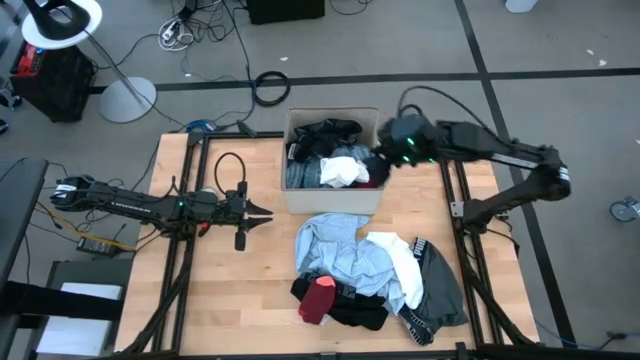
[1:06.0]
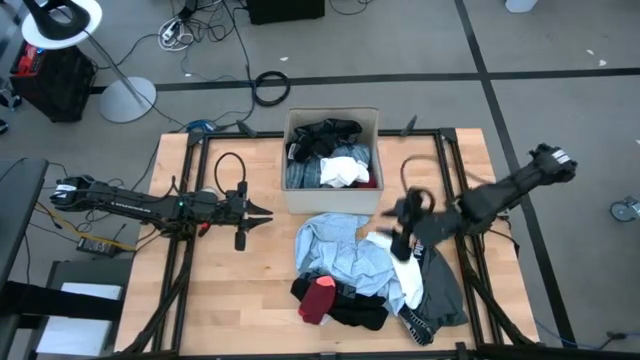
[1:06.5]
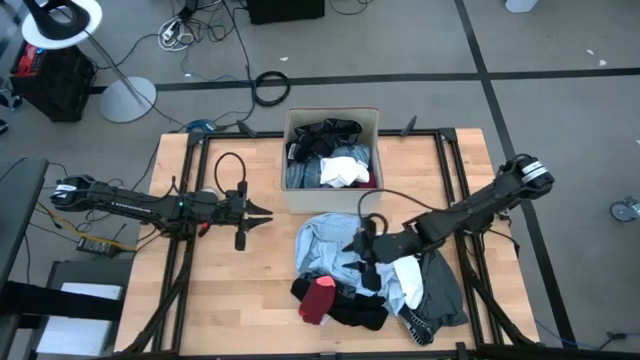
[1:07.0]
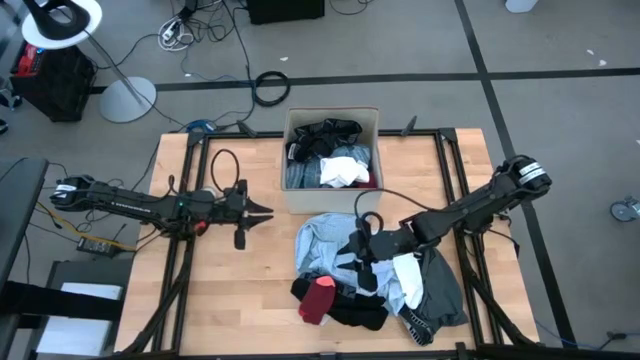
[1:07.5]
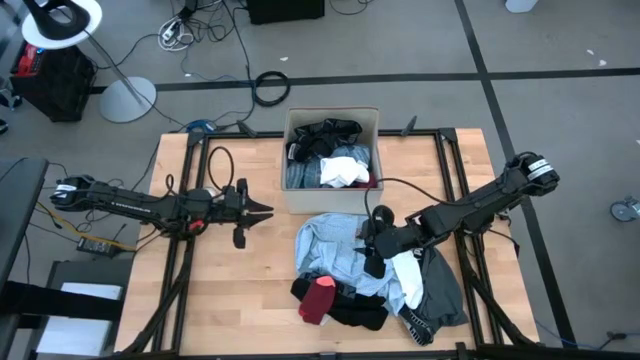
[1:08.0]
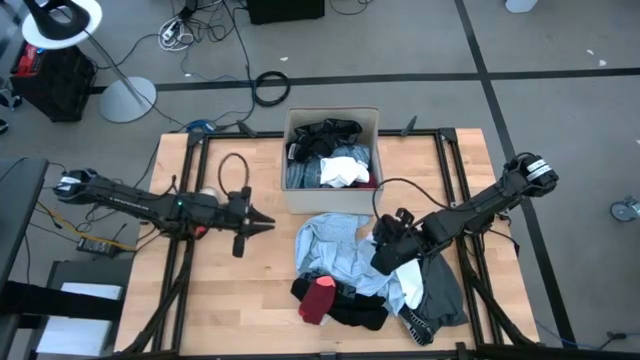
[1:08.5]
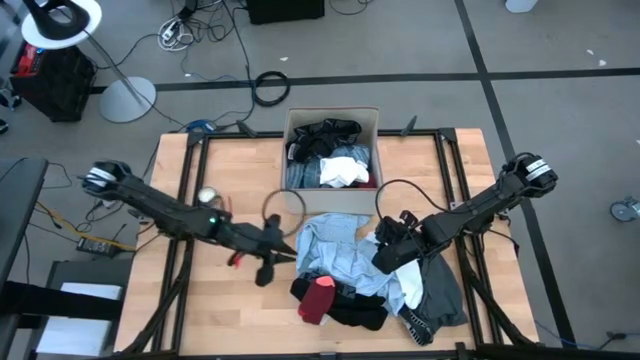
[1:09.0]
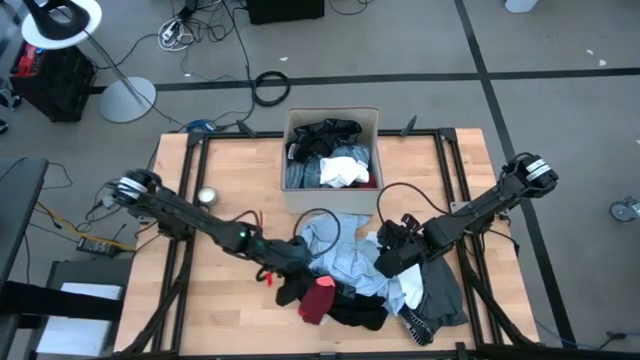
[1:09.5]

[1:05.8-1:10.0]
Task: Sort clothes
Put the red sock into the white laundry bin

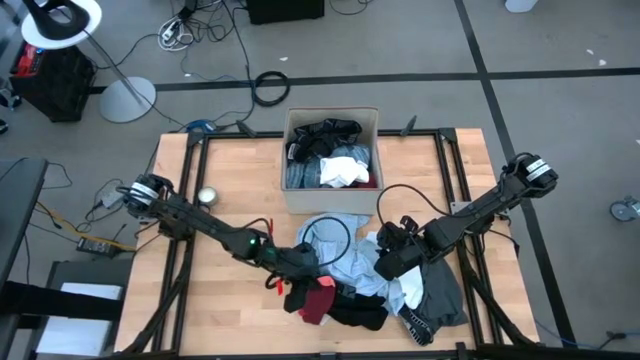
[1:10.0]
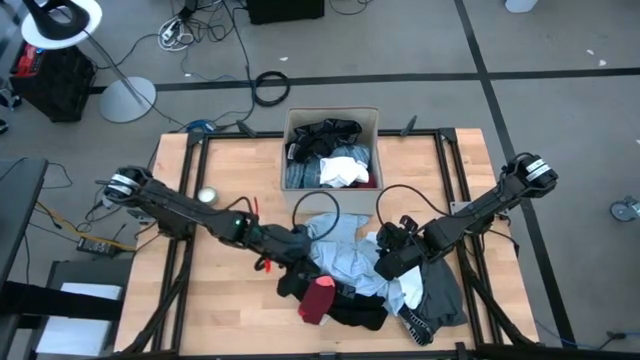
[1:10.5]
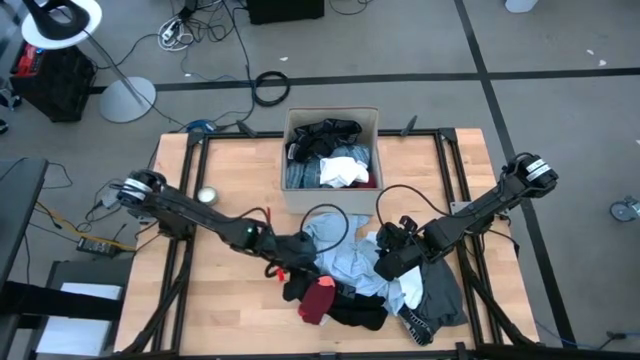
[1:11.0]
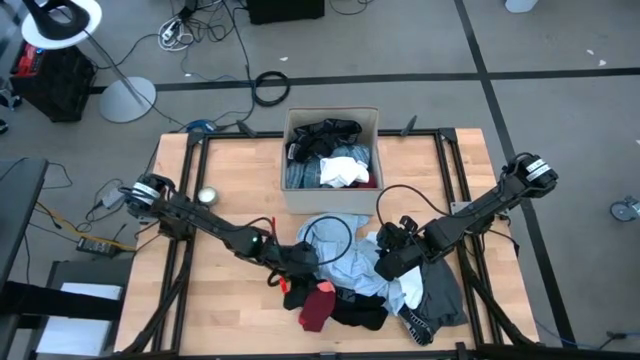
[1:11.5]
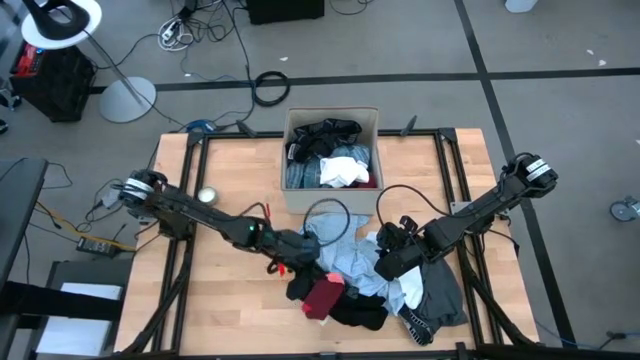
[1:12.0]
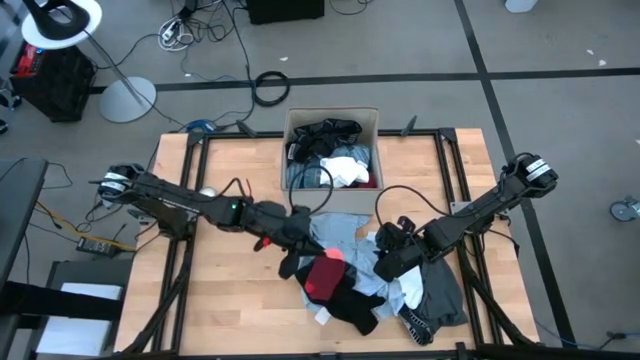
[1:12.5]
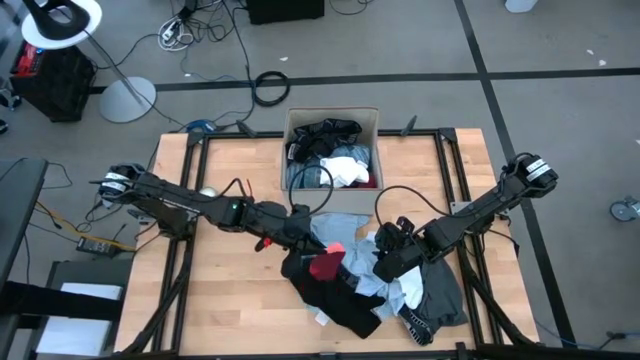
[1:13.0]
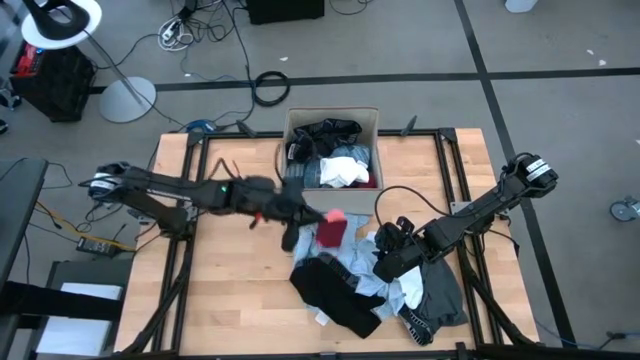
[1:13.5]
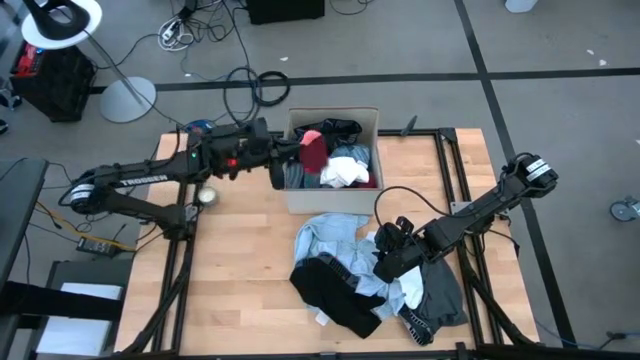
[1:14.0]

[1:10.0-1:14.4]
Put the red sock into the white laundry bin

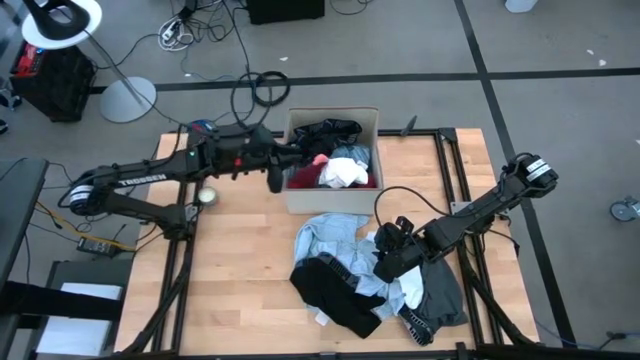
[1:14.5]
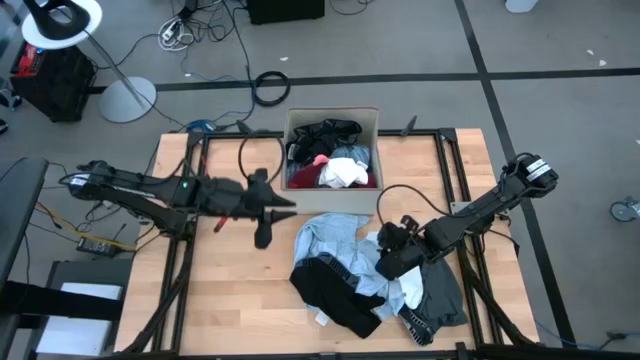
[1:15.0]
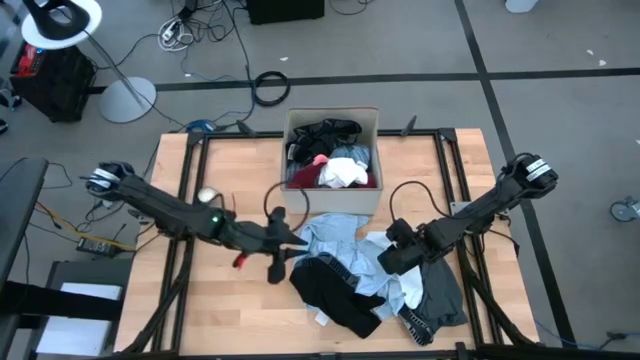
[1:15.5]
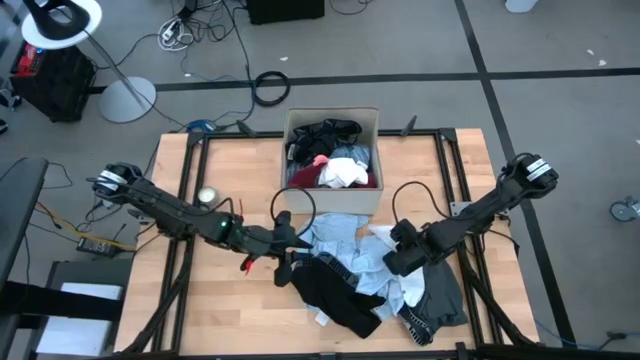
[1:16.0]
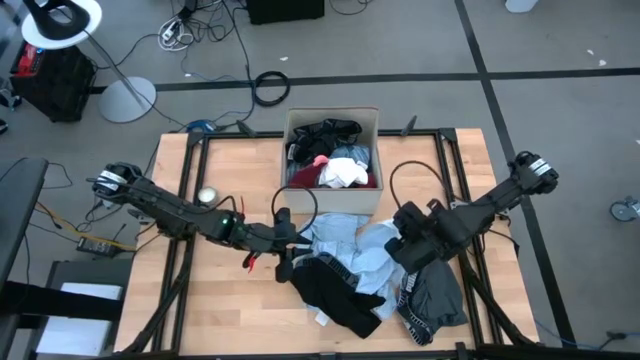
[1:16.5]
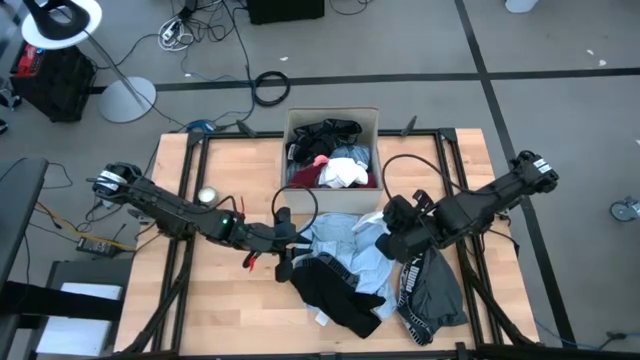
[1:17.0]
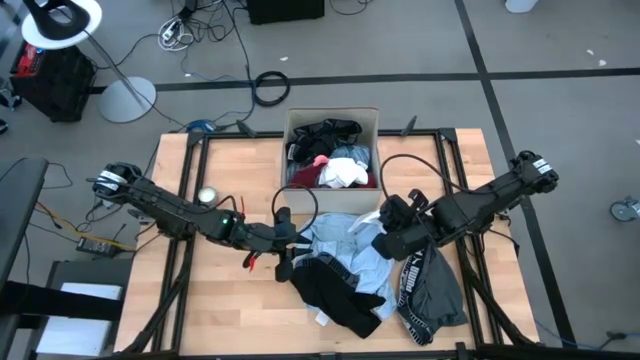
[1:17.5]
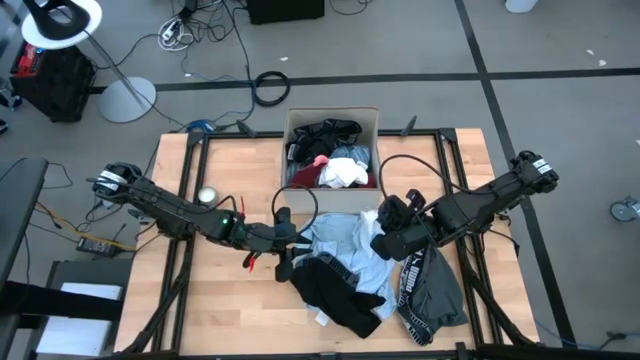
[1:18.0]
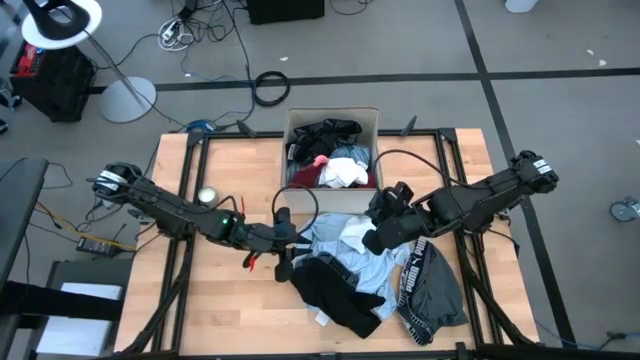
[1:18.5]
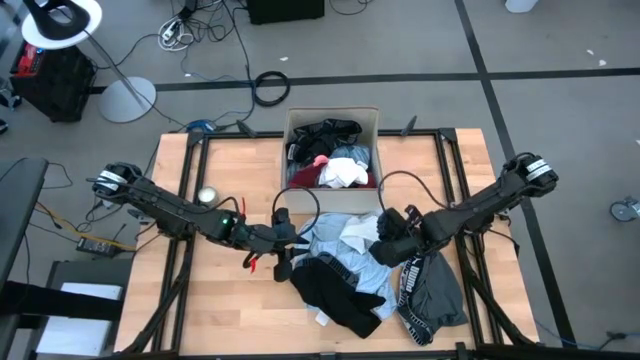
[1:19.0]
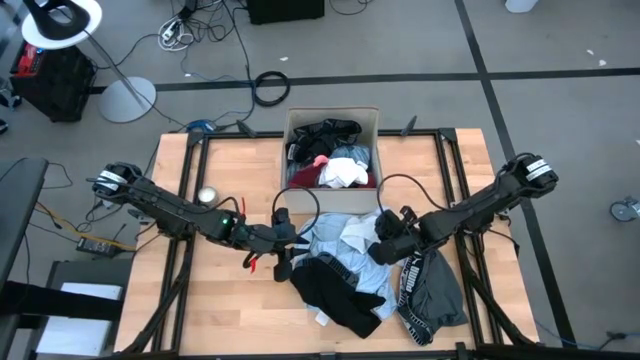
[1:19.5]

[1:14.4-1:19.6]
Put the white sock into the white laundry bin

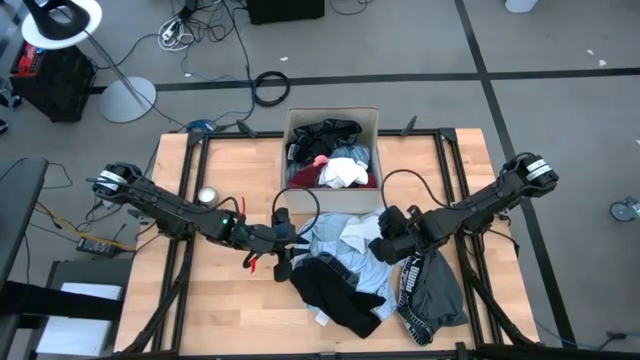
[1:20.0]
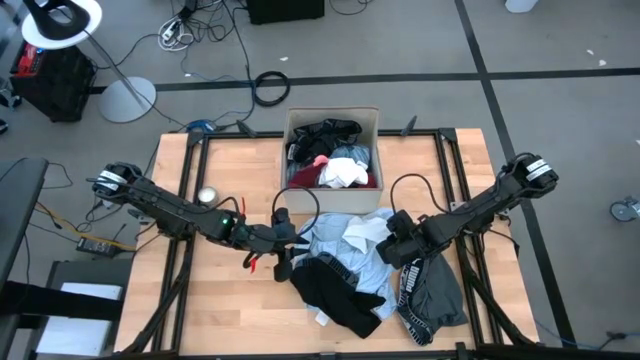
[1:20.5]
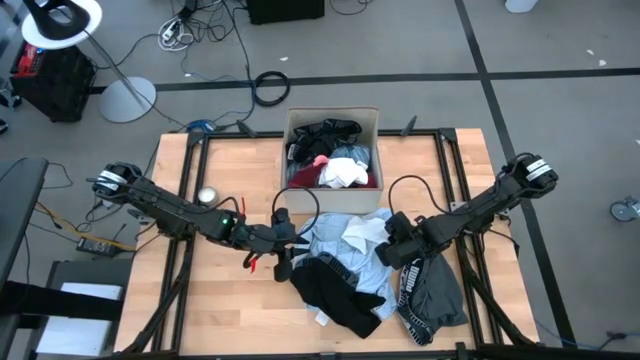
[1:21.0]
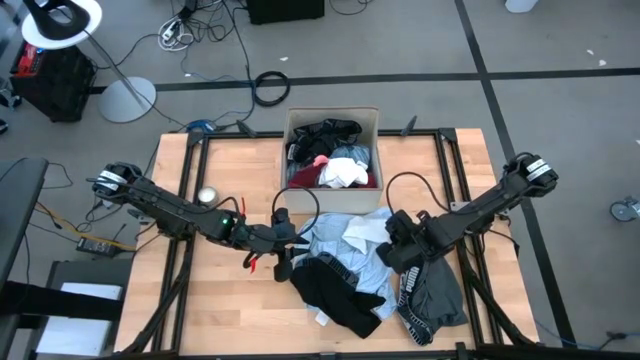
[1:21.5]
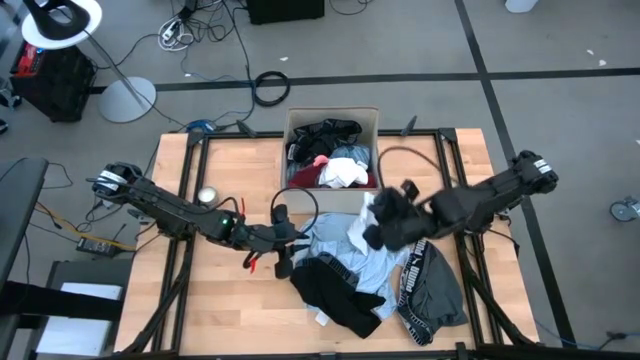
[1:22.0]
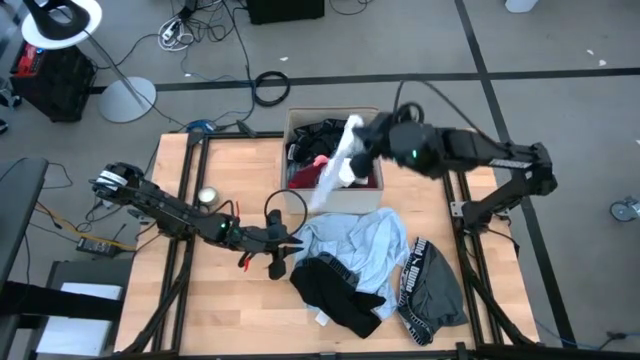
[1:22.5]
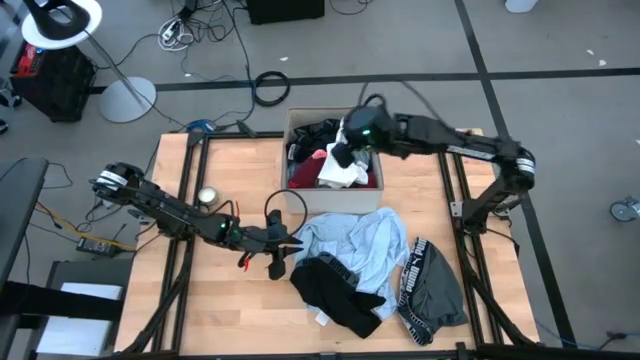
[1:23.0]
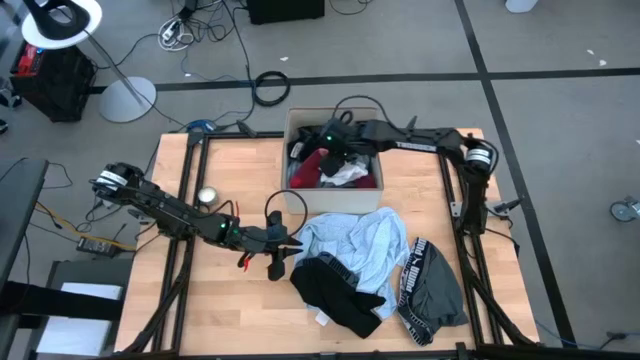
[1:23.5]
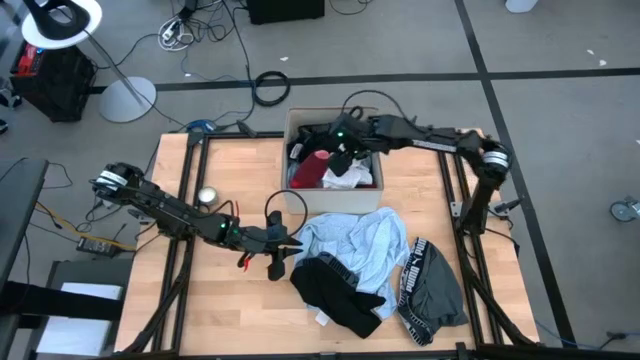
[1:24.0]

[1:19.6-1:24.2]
Put the white sock into the white laundry bin

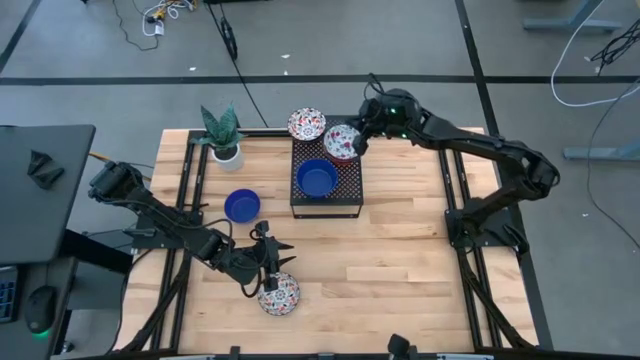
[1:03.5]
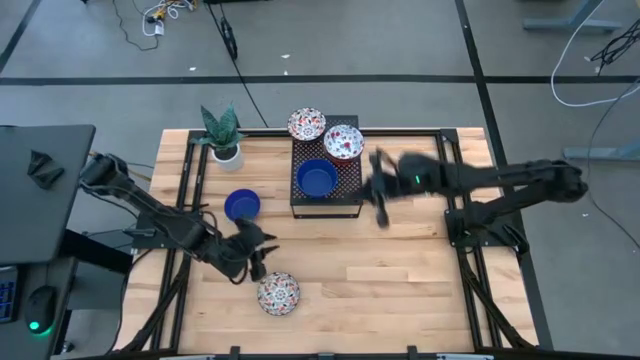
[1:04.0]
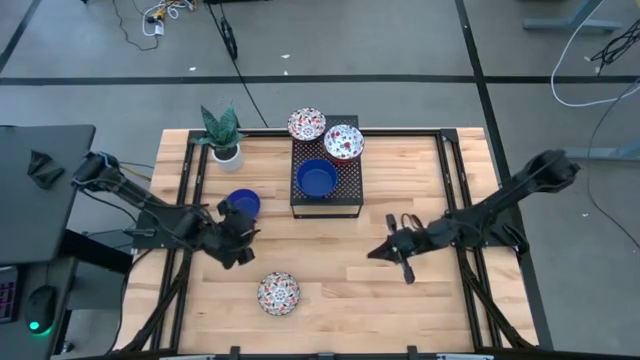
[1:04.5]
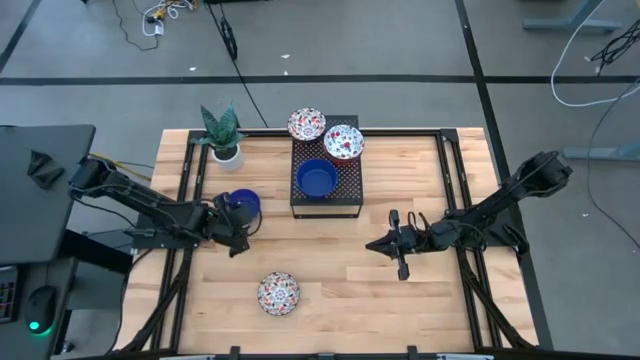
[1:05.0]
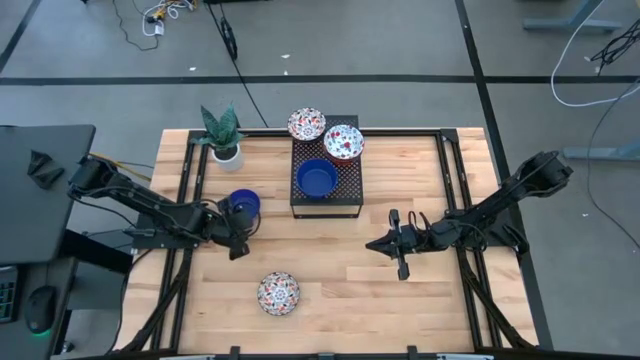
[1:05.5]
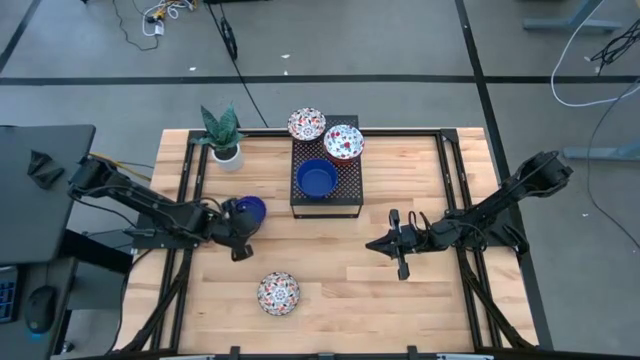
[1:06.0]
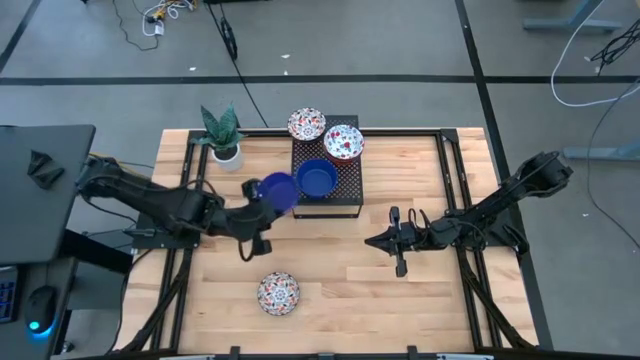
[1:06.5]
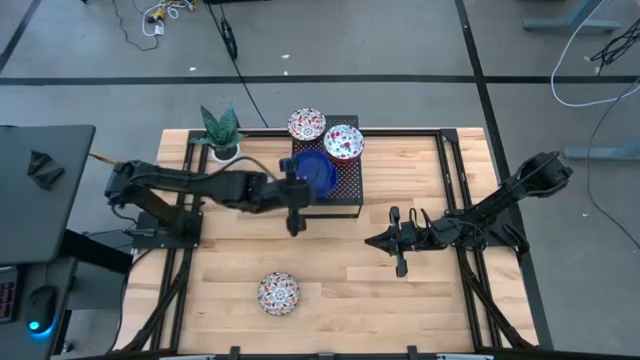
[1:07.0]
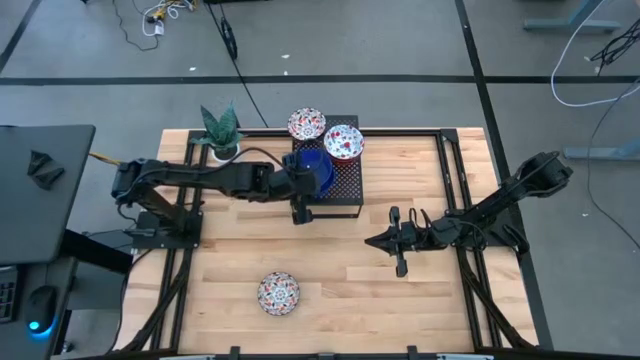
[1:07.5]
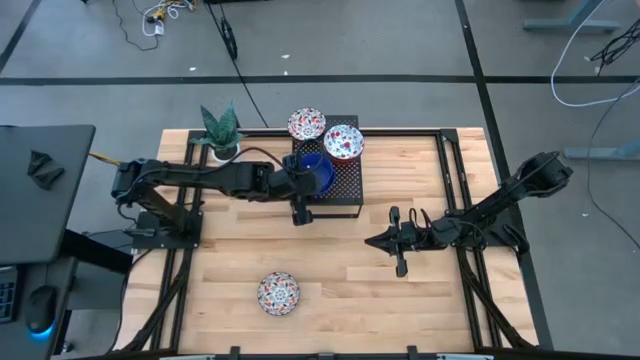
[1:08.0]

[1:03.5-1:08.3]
Task: Pick & Place Mini bowls
Stack the blue bowl on top of the blue bowls on the shelf
